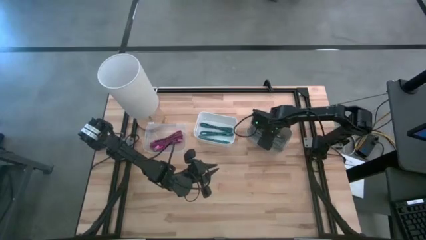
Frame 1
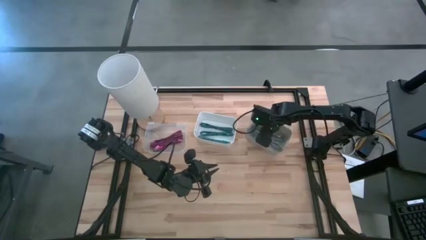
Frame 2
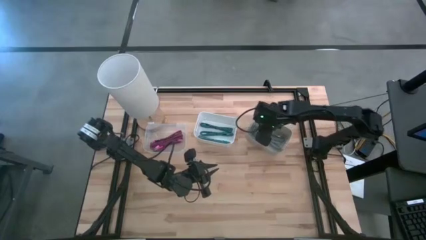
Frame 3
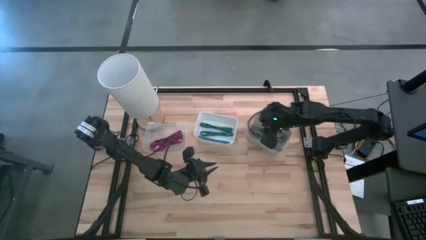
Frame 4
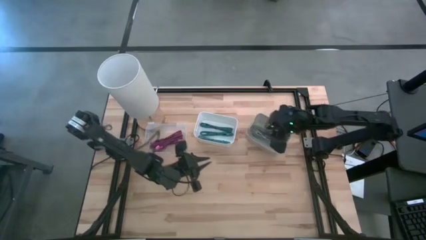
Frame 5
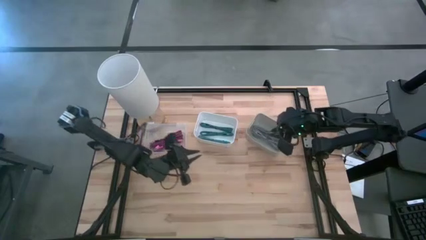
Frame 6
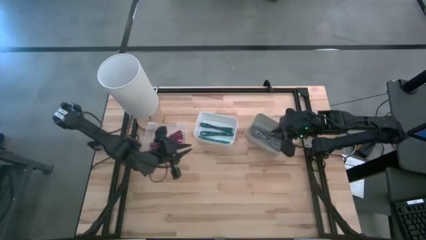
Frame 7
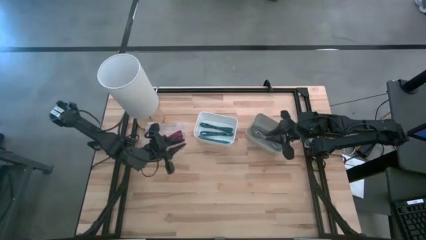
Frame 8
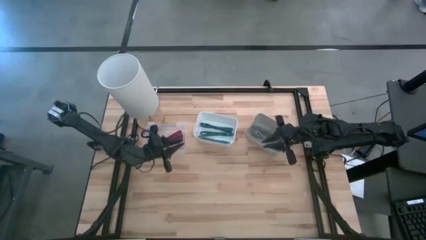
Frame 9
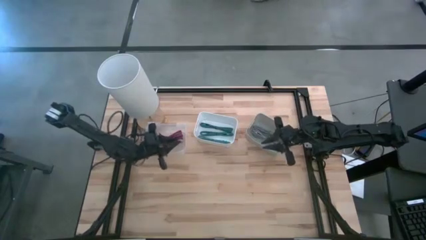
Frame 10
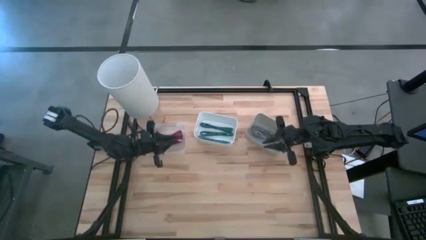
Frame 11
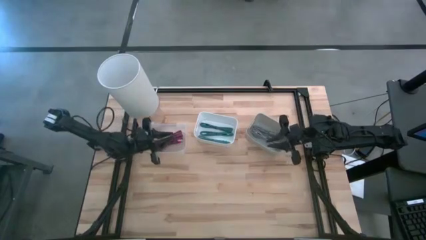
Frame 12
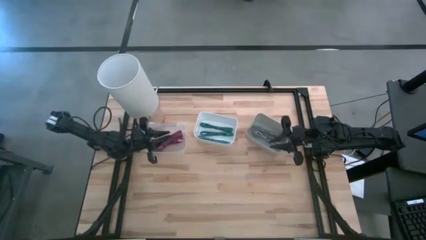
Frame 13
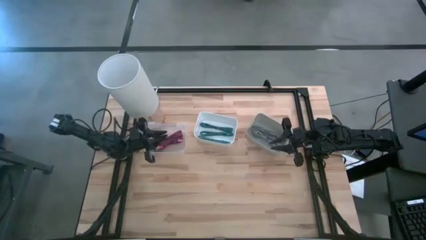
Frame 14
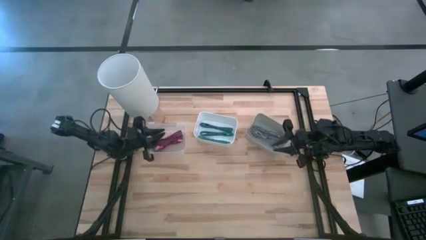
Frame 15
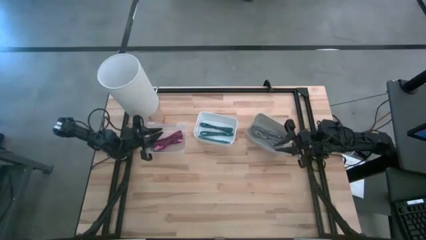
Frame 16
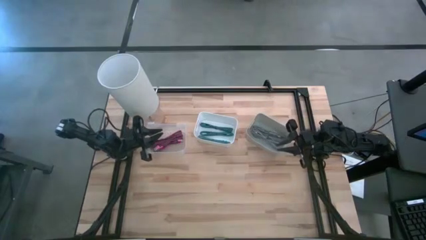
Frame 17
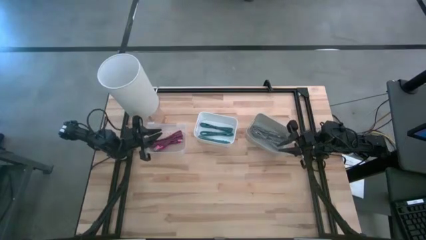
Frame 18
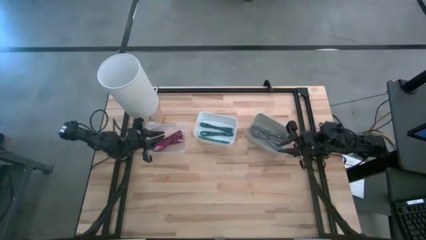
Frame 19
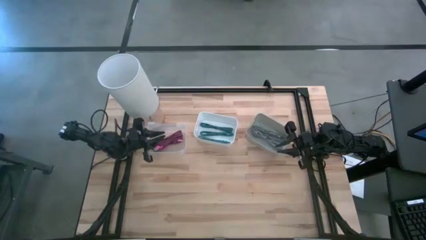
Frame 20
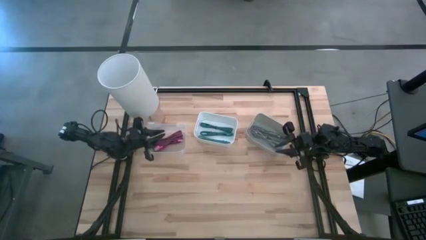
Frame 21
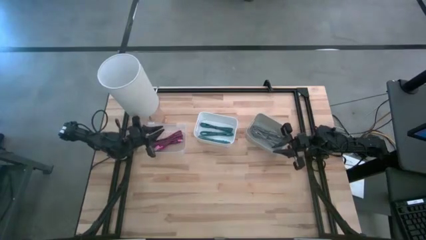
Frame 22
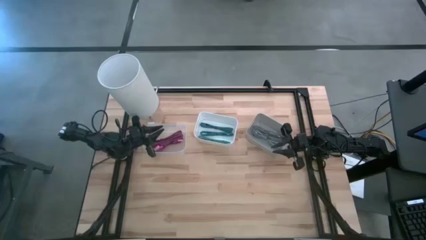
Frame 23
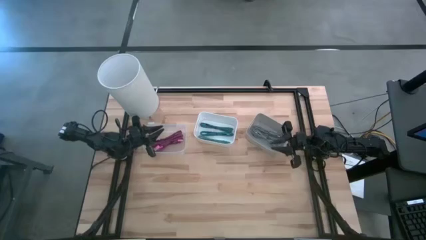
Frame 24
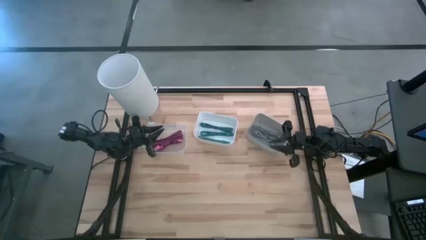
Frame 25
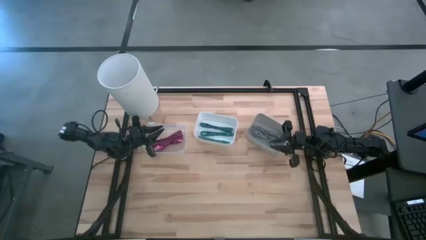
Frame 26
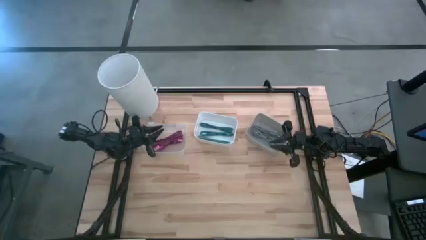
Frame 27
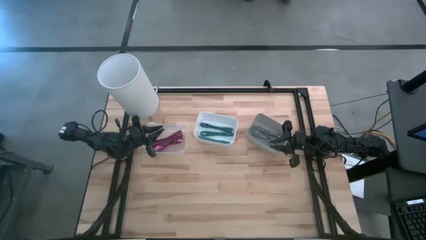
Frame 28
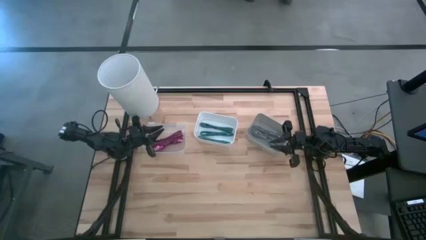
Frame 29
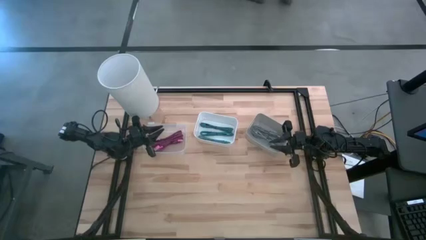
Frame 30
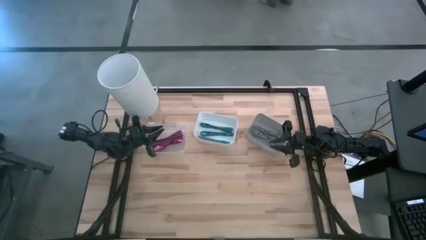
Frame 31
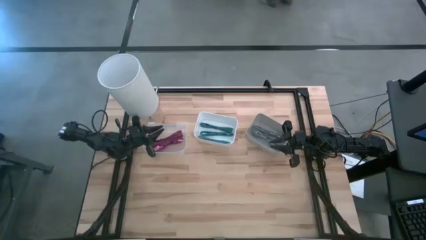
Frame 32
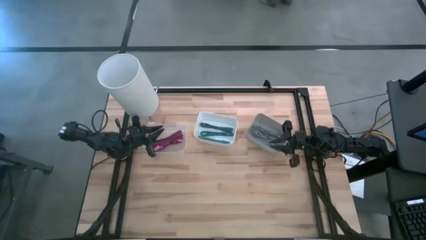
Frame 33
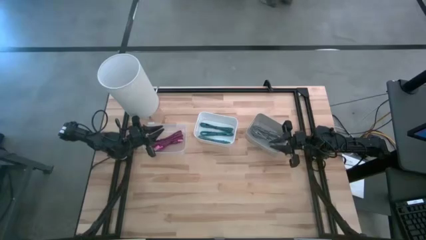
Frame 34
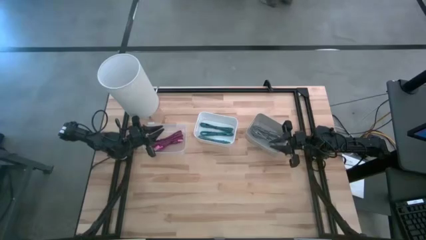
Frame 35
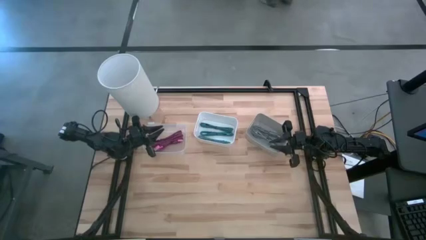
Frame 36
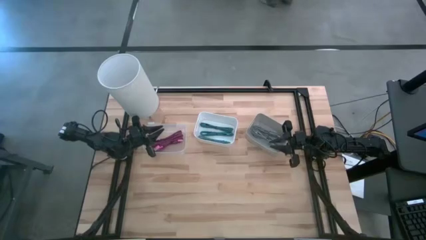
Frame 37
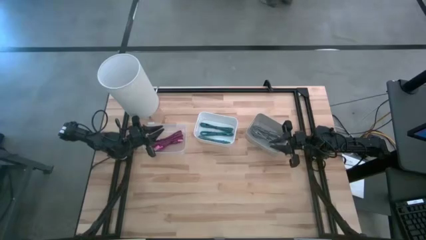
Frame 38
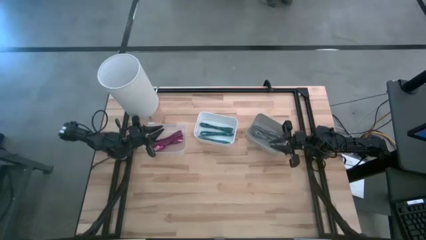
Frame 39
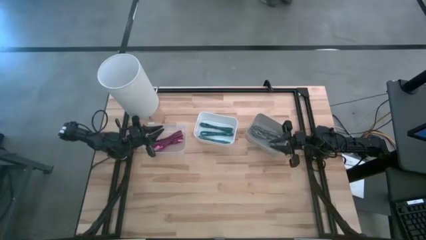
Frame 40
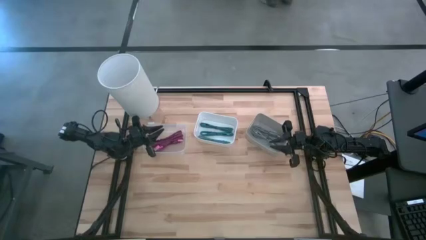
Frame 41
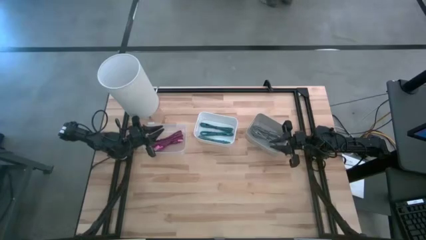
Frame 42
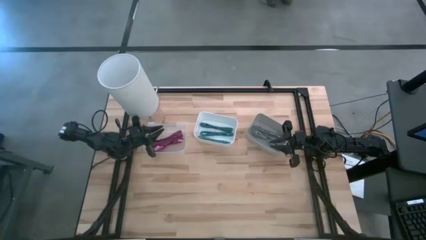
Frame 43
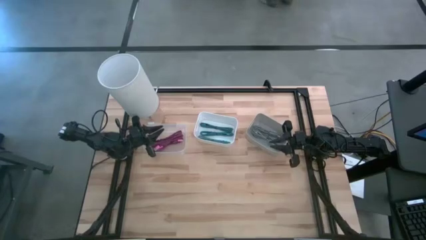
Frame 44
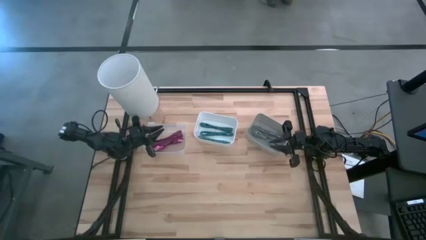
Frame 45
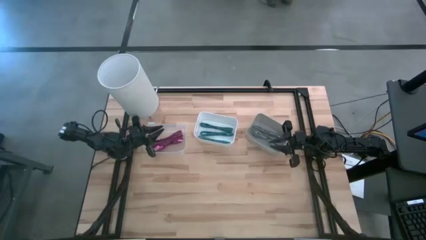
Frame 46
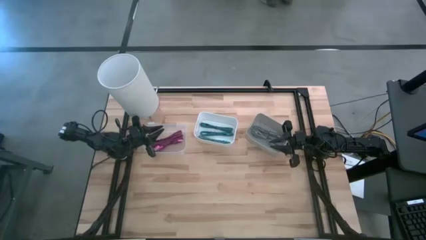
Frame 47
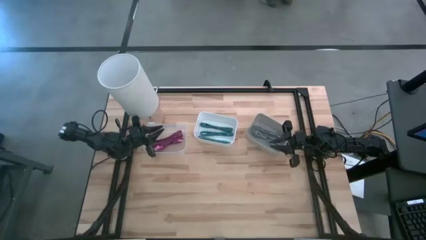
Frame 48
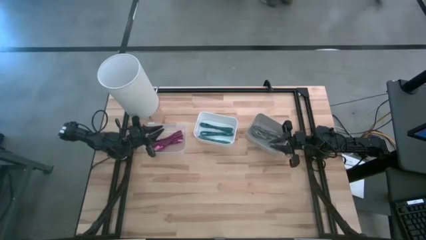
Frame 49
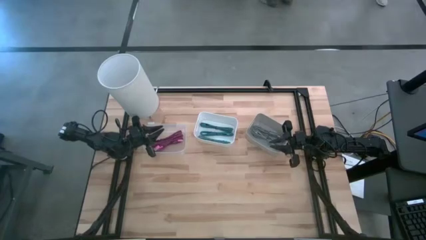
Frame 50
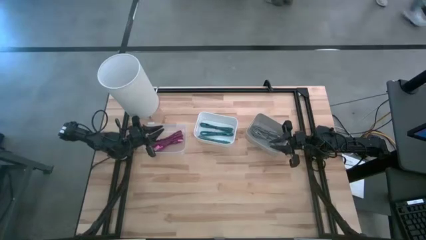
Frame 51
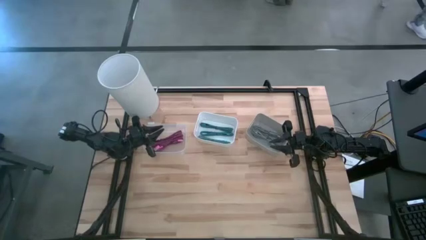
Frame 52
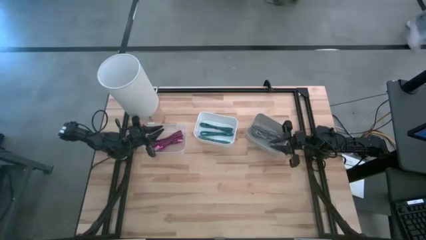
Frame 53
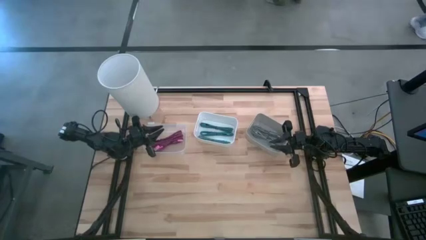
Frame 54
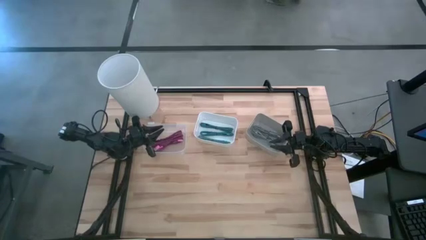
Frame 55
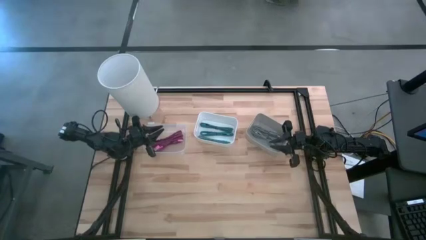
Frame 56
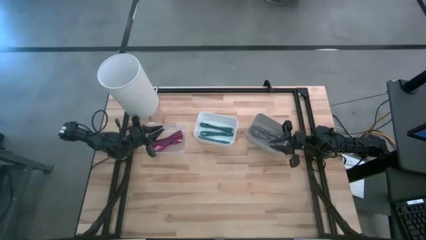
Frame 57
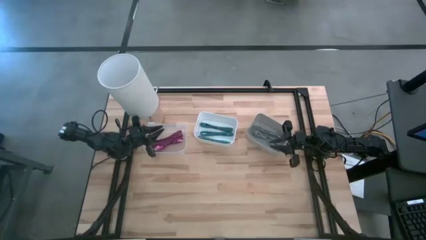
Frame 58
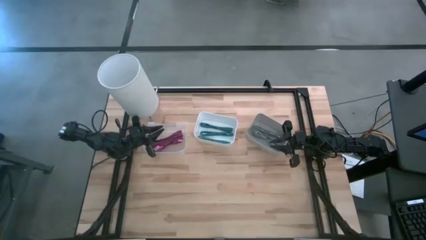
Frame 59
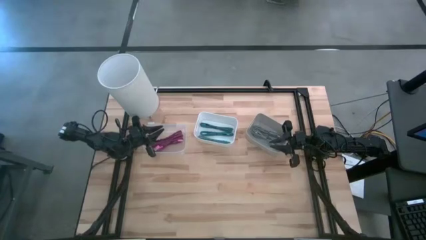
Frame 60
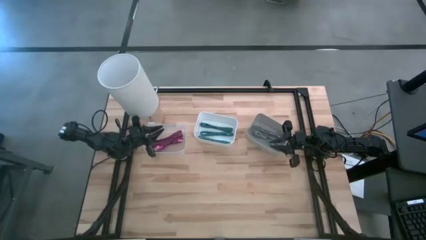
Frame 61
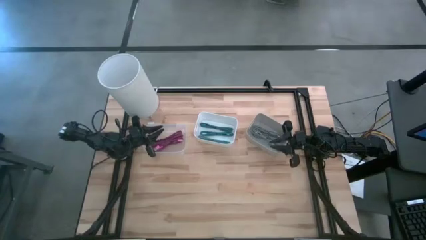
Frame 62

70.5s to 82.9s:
Task: Pick & Place USB Port
Return to Home Position

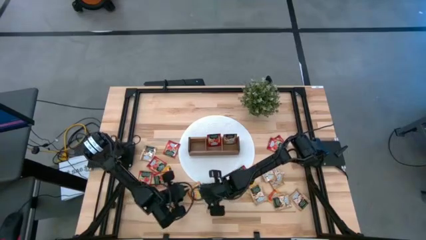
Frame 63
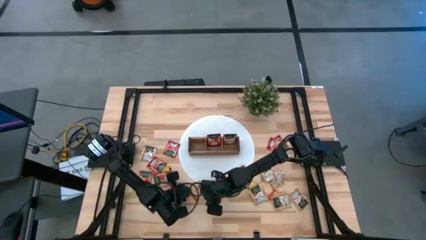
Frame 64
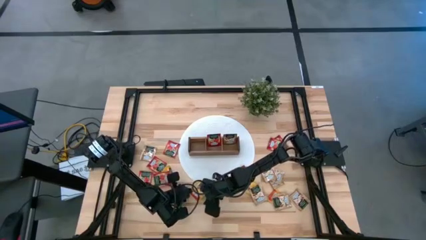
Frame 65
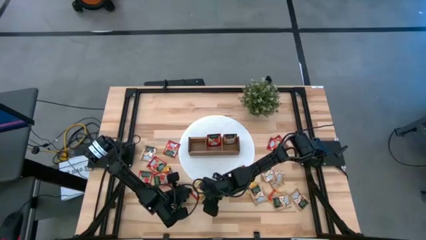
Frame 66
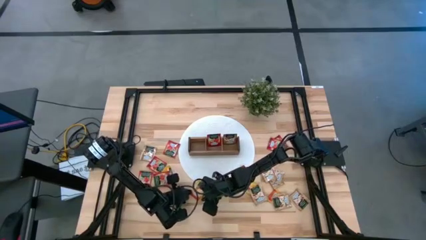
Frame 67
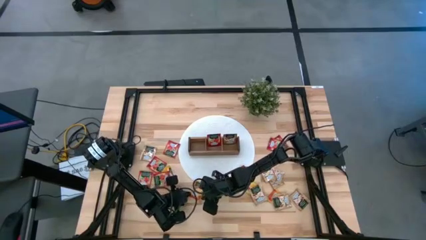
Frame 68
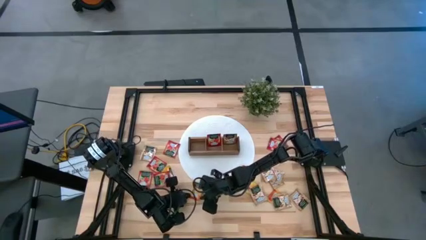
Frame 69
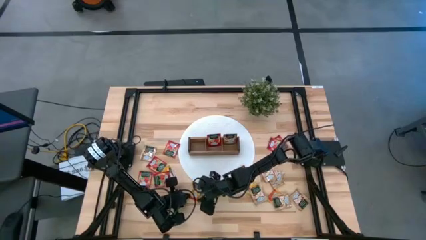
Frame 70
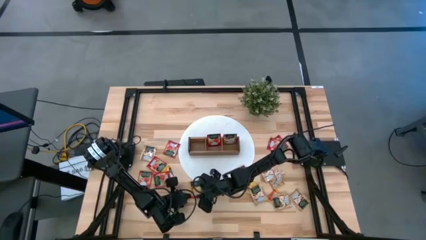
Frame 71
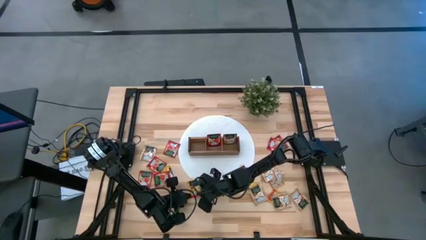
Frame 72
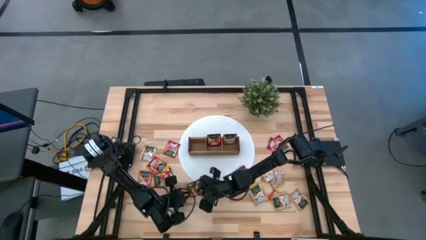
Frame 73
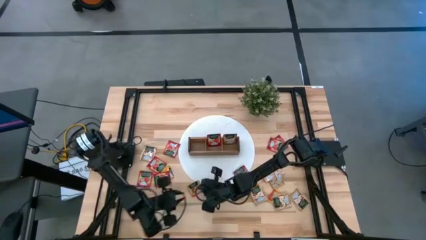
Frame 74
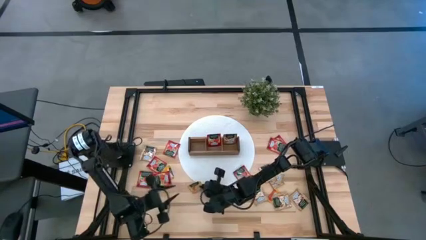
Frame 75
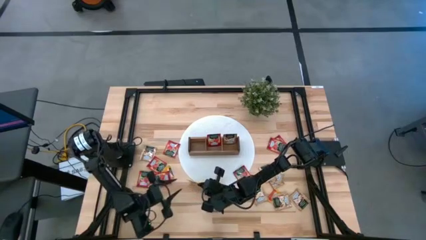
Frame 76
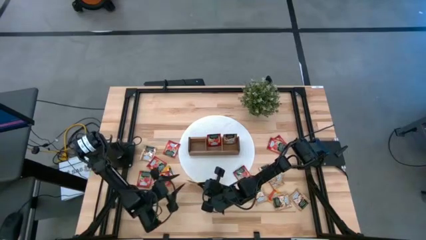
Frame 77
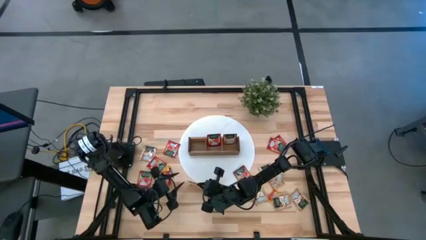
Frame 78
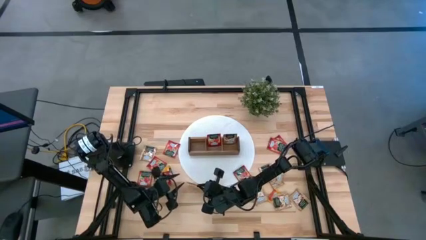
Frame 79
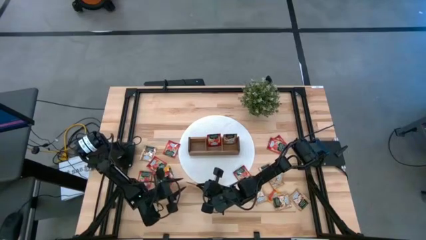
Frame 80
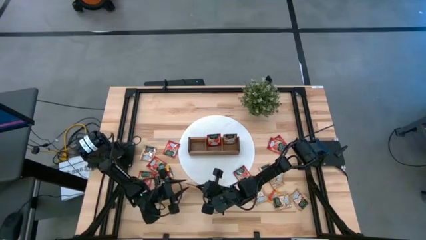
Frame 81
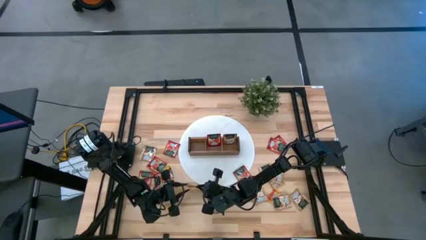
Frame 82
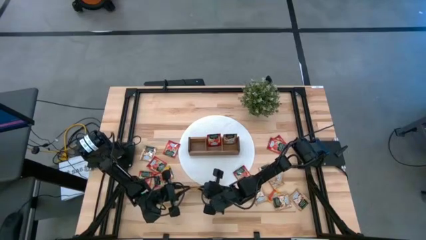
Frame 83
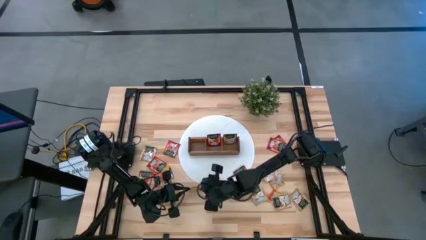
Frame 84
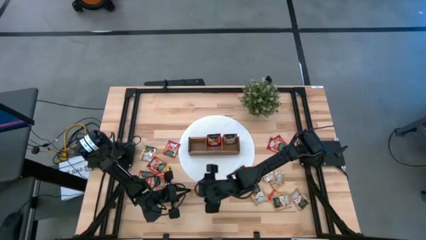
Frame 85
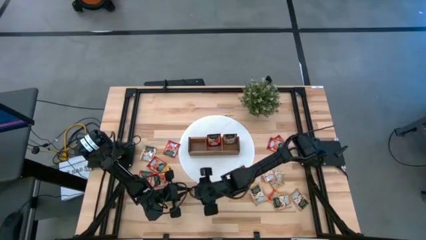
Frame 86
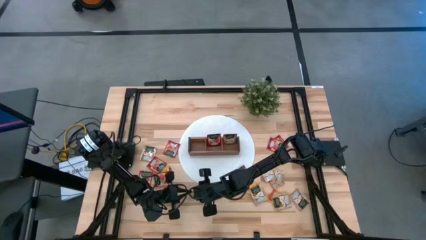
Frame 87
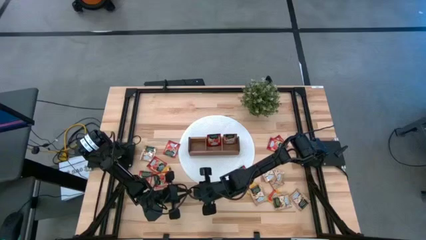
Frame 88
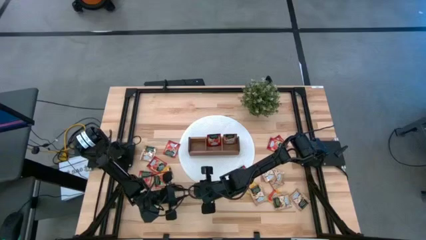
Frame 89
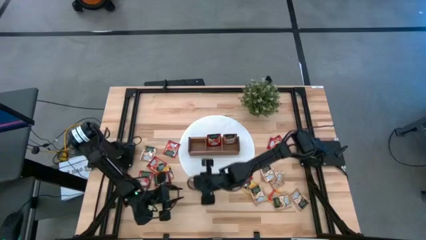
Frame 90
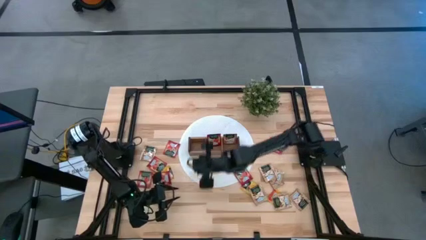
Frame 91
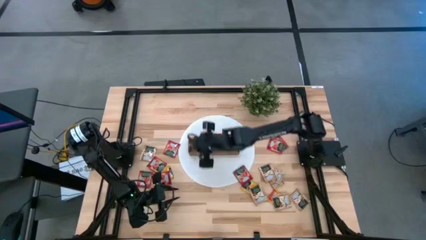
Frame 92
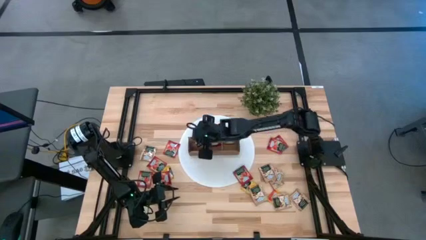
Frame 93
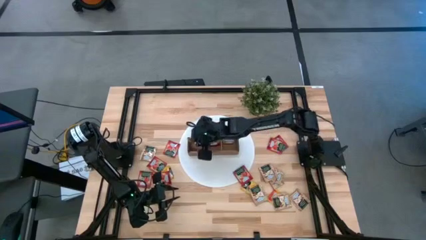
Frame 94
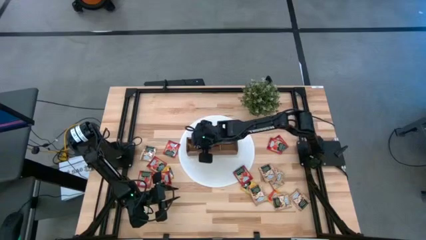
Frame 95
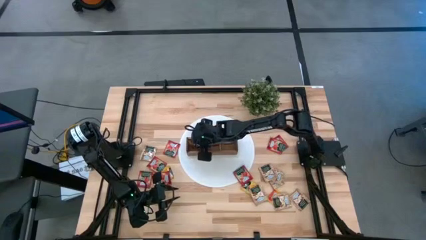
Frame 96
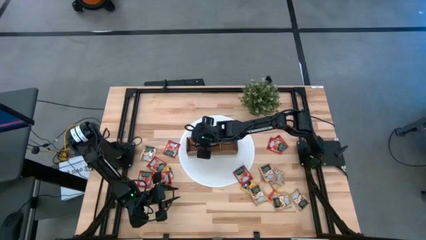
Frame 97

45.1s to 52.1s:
Task: Pick & Place Tea
Put the orange tea bag into the left section of the wooden organizer
